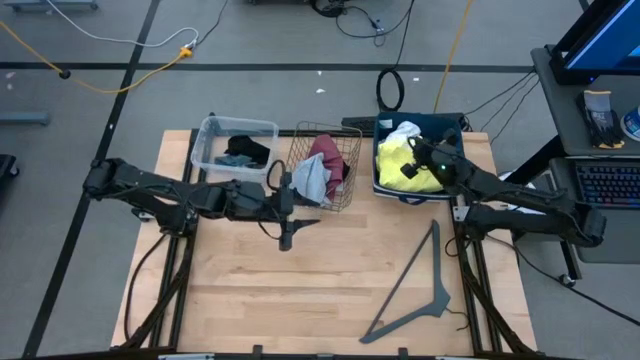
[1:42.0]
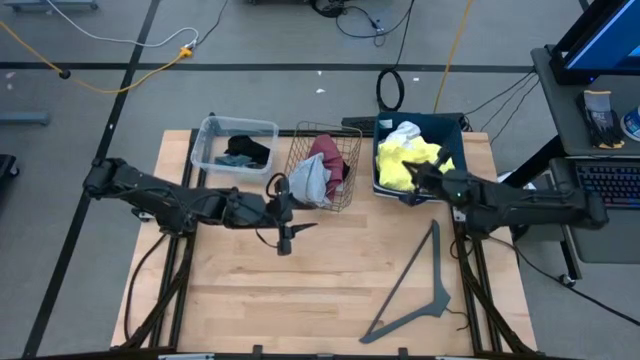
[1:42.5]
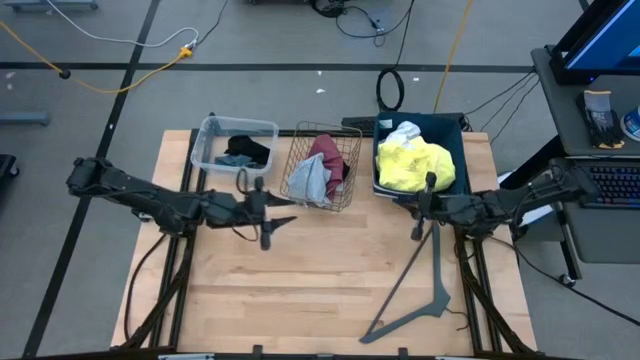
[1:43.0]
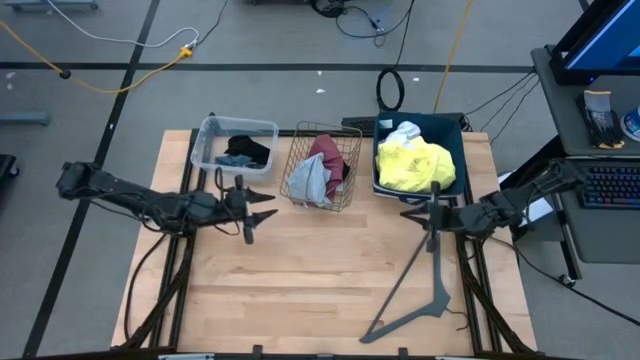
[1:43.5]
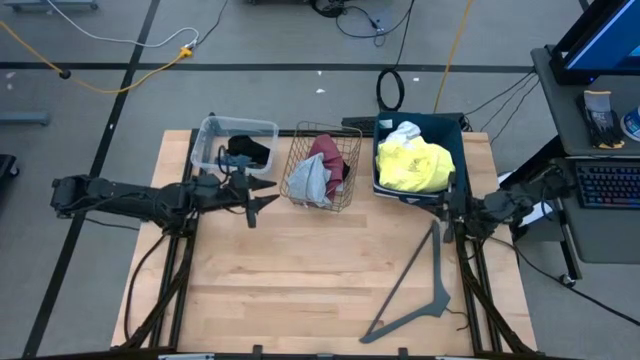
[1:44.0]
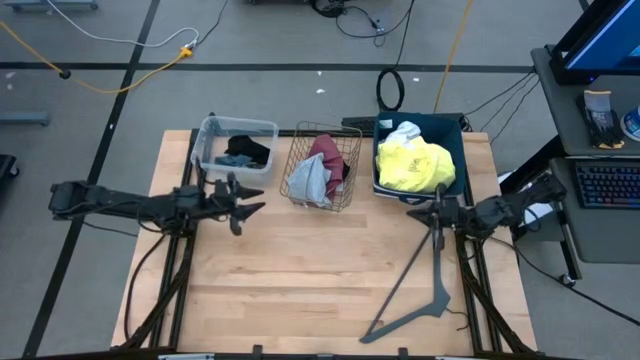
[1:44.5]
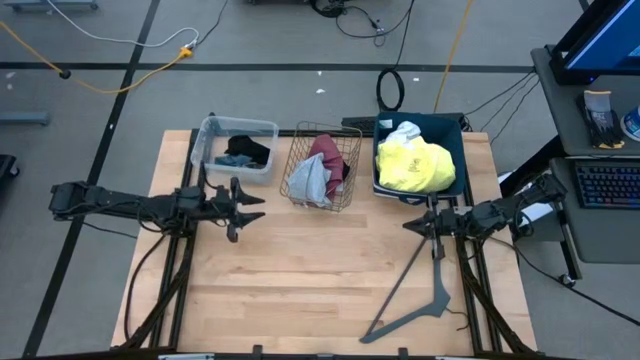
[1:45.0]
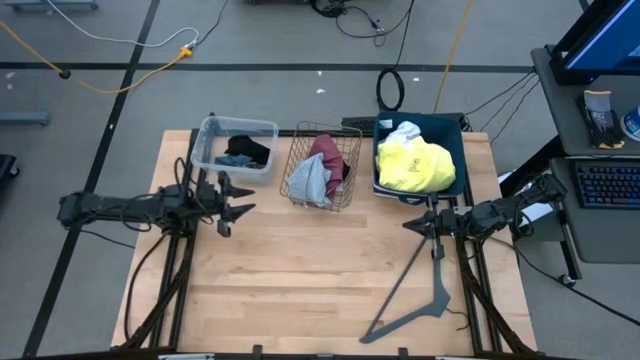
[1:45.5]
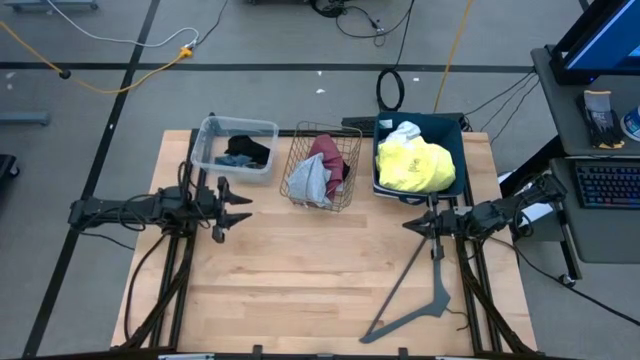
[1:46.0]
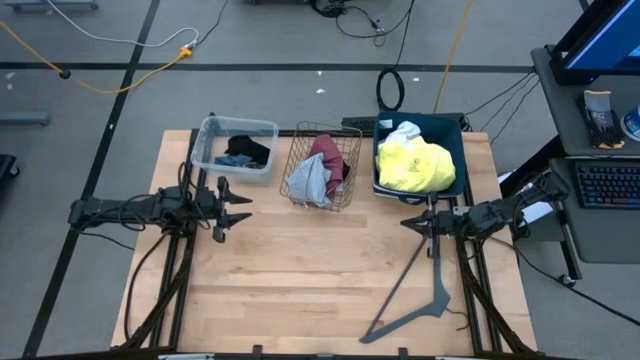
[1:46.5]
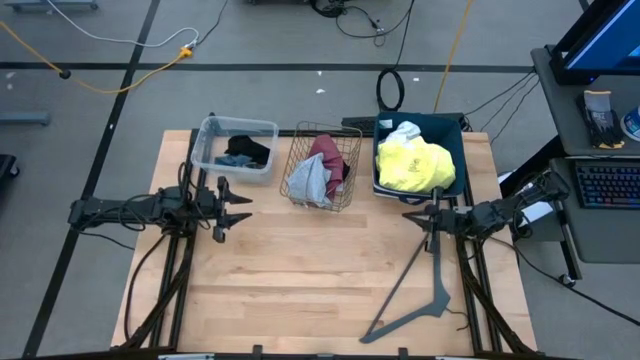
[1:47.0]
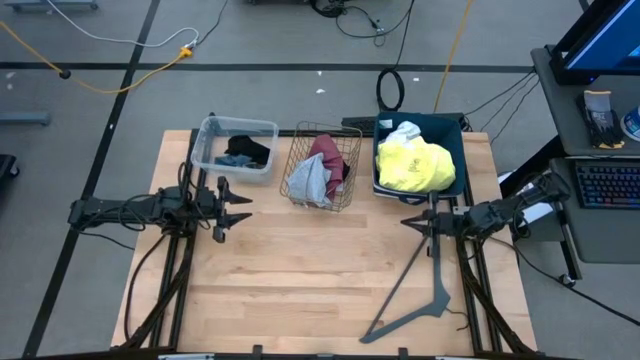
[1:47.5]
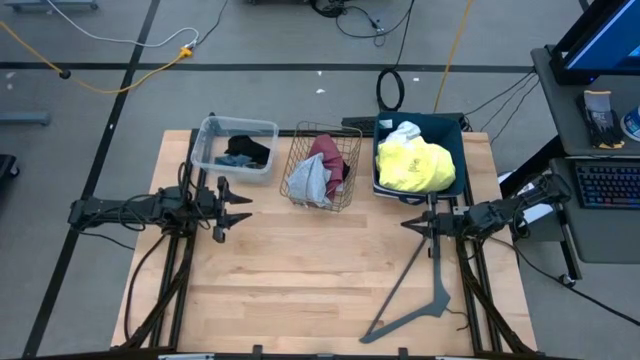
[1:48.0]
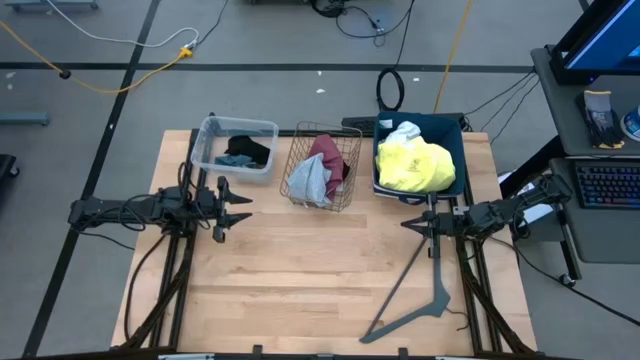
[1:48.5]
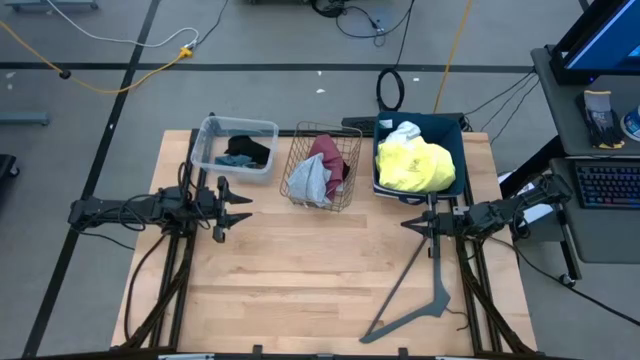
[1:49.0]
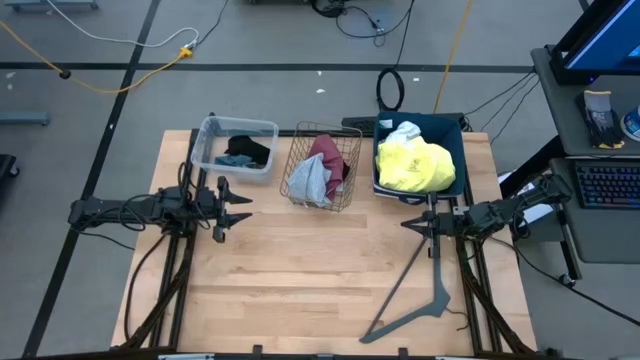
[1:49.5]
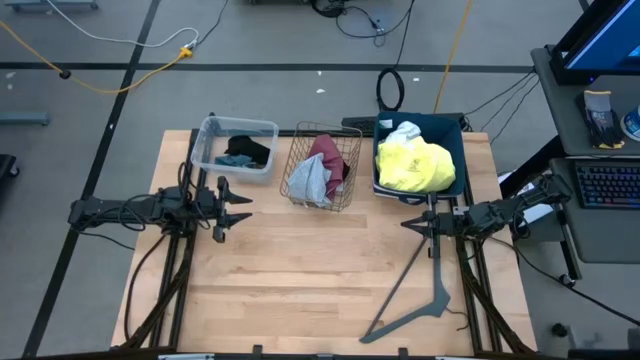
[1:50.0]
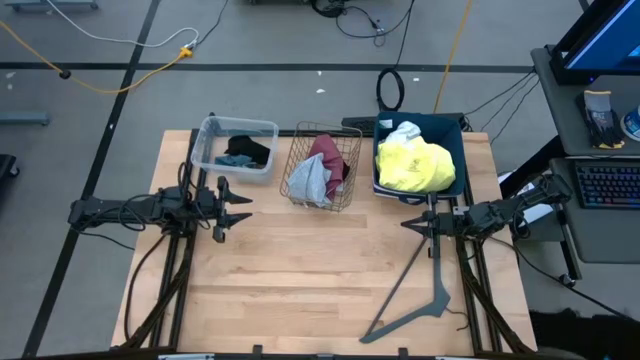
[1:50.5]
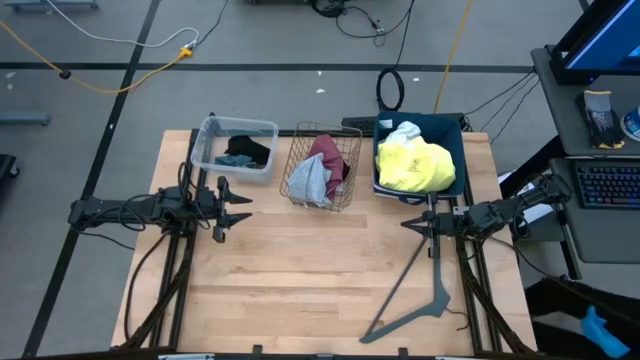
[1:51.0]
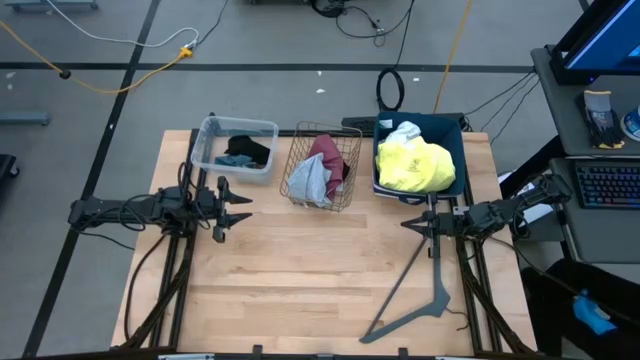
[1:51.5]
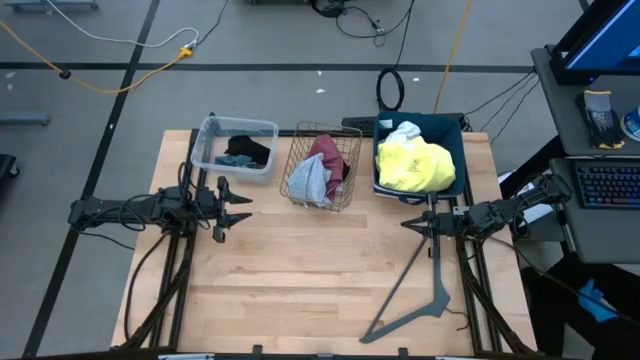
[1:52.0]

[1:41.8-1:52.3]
Task: Pick & Place Cloths
Return to Home Position

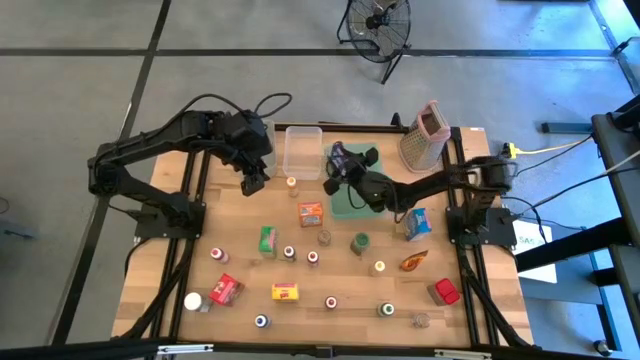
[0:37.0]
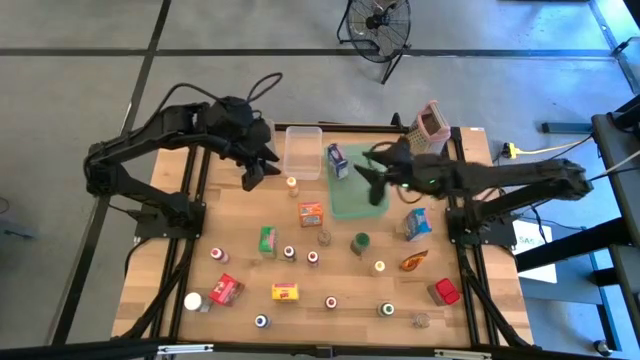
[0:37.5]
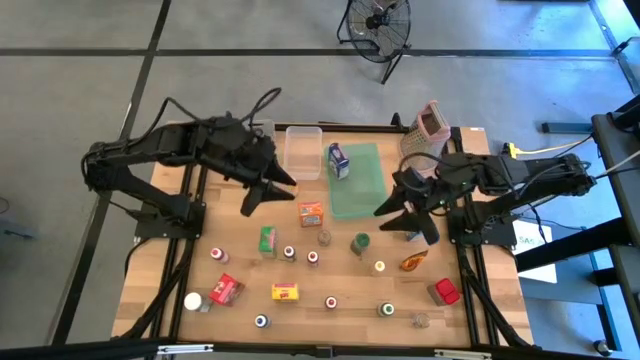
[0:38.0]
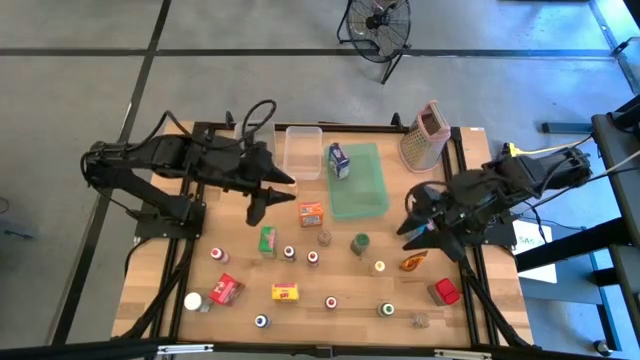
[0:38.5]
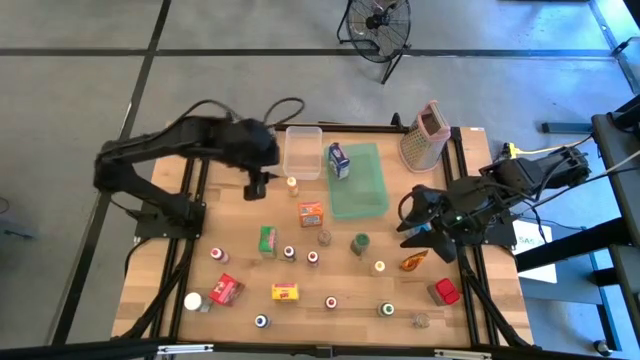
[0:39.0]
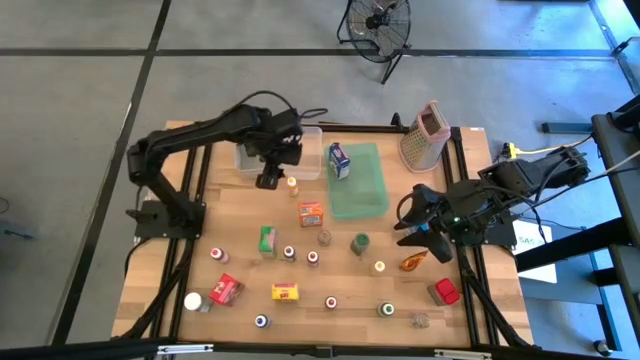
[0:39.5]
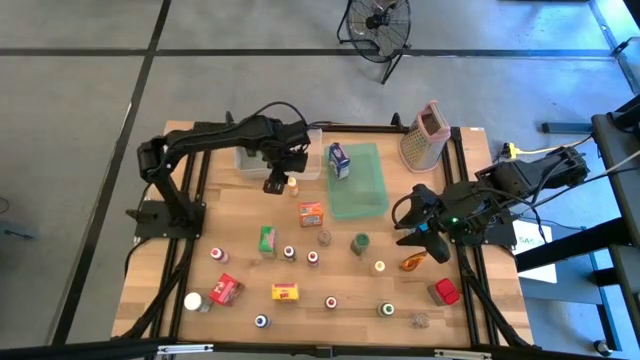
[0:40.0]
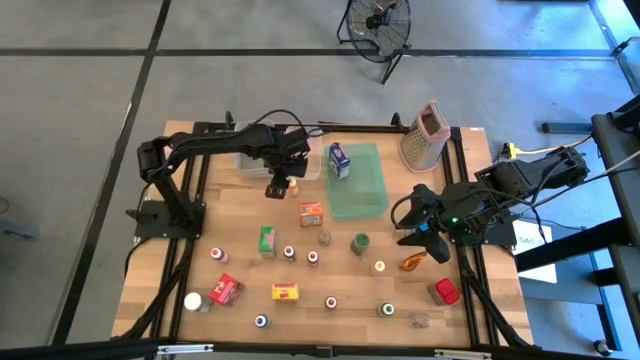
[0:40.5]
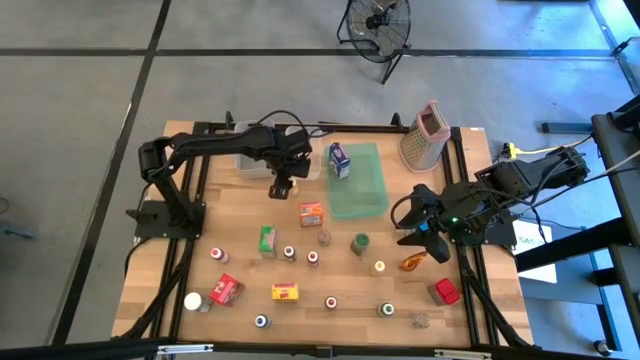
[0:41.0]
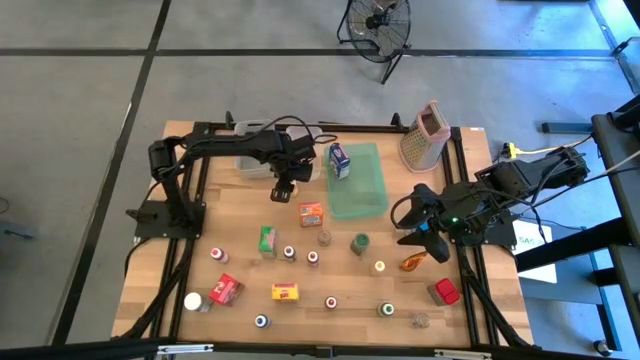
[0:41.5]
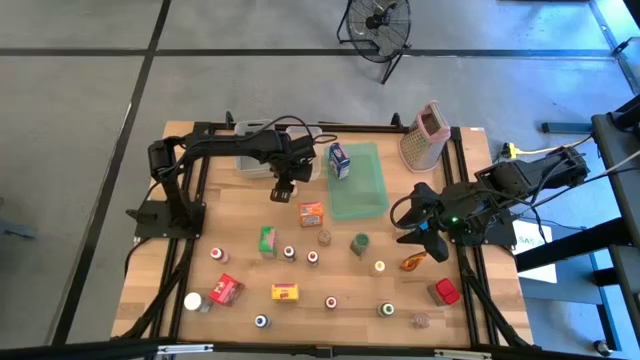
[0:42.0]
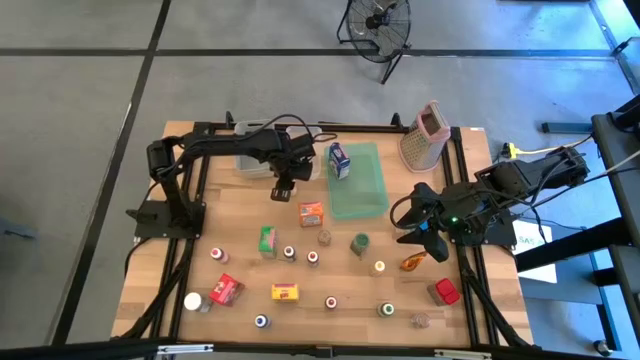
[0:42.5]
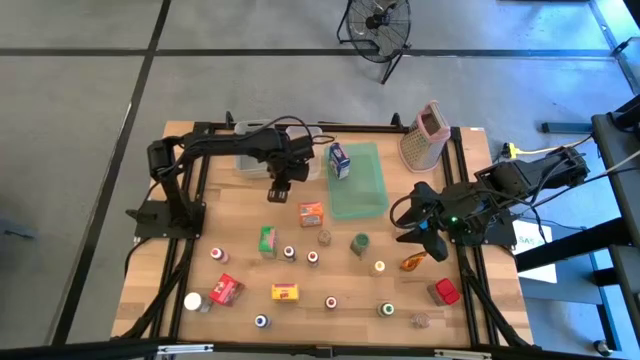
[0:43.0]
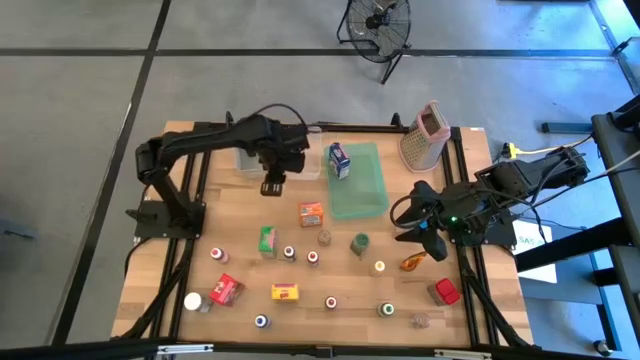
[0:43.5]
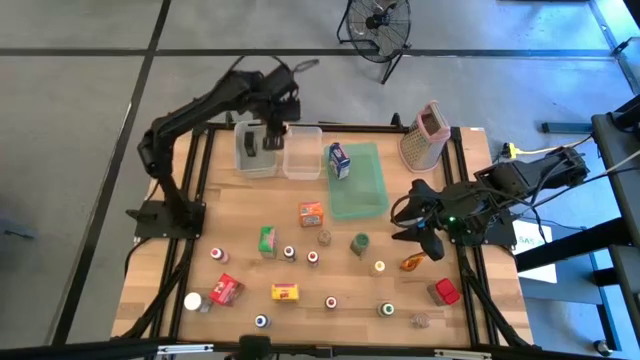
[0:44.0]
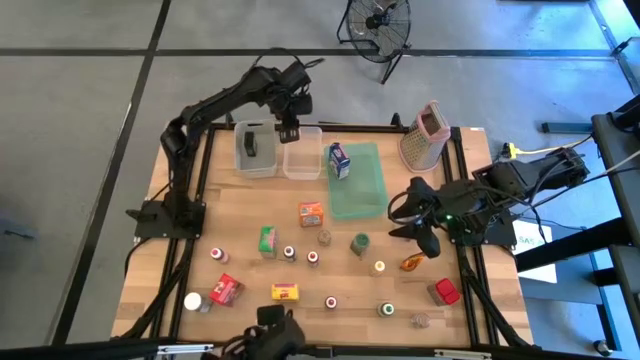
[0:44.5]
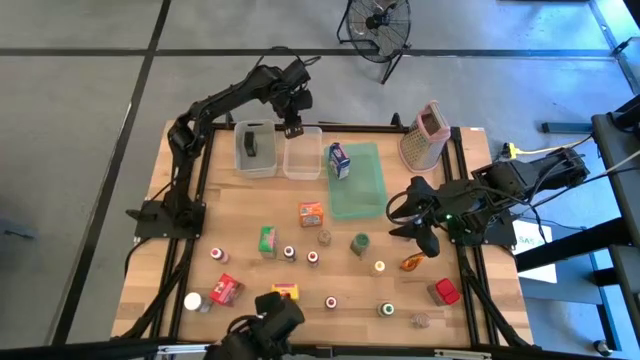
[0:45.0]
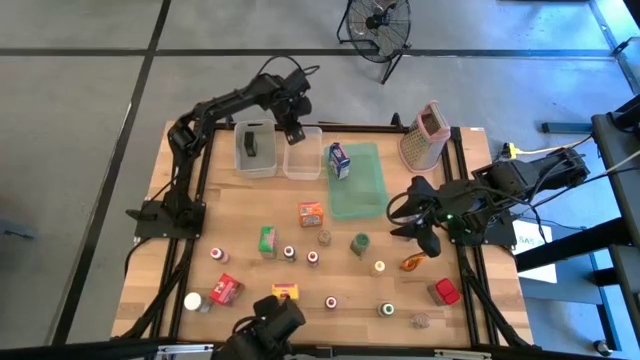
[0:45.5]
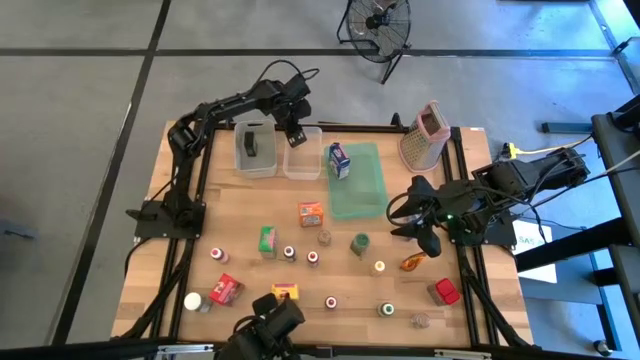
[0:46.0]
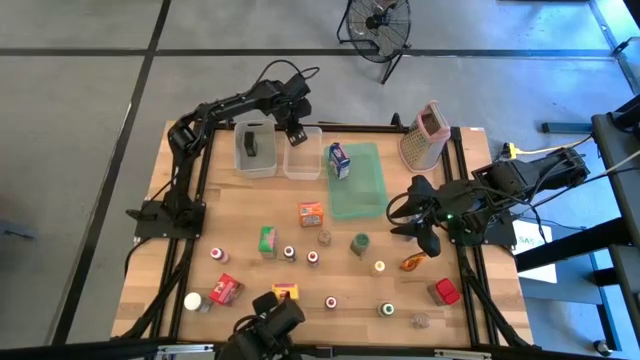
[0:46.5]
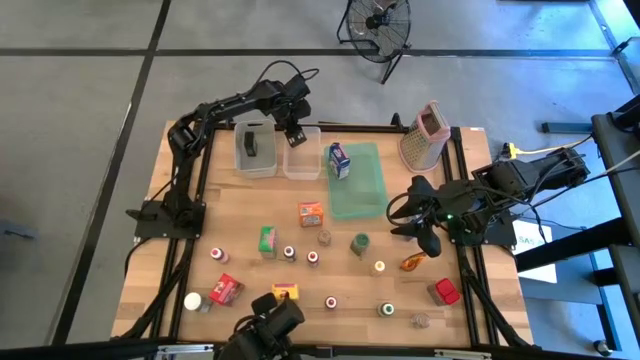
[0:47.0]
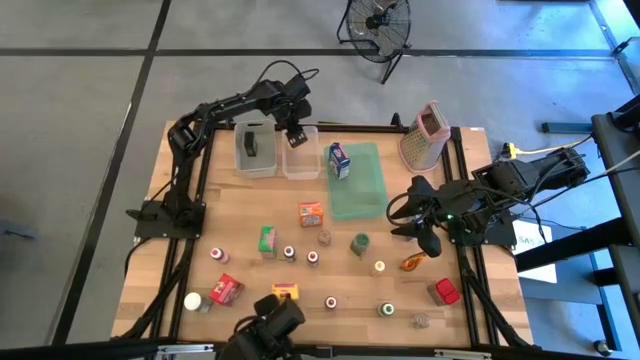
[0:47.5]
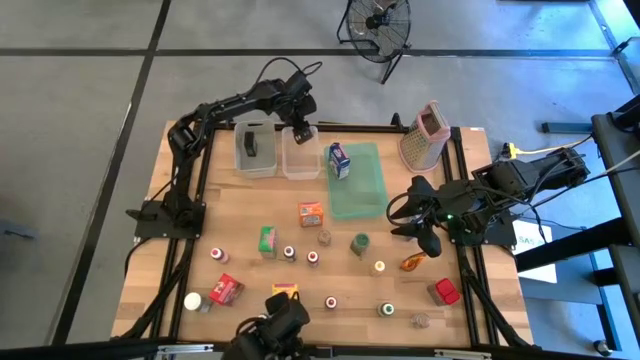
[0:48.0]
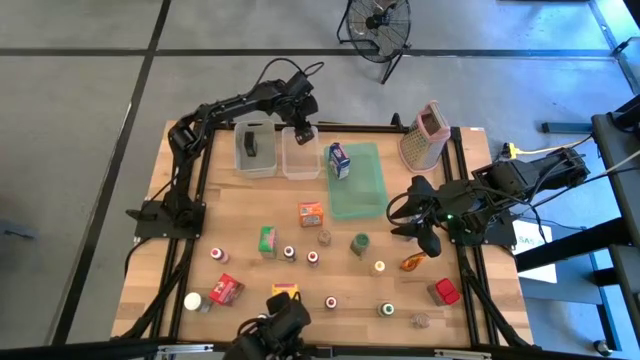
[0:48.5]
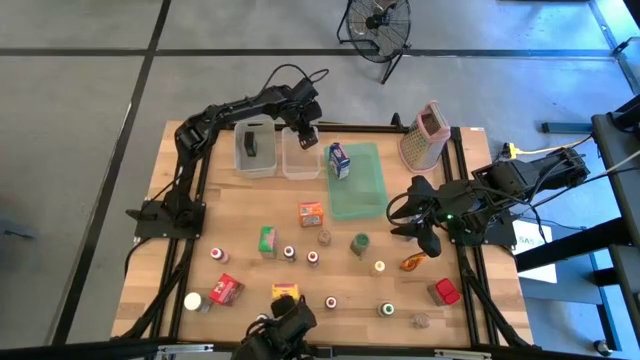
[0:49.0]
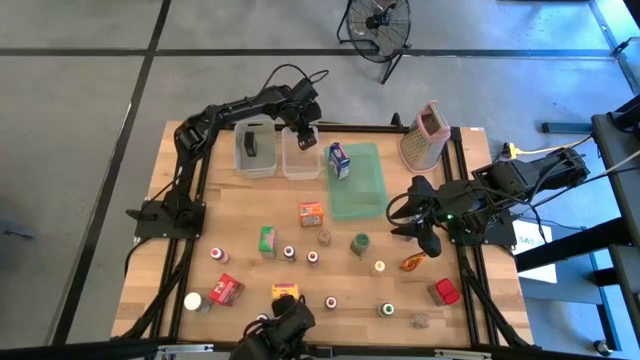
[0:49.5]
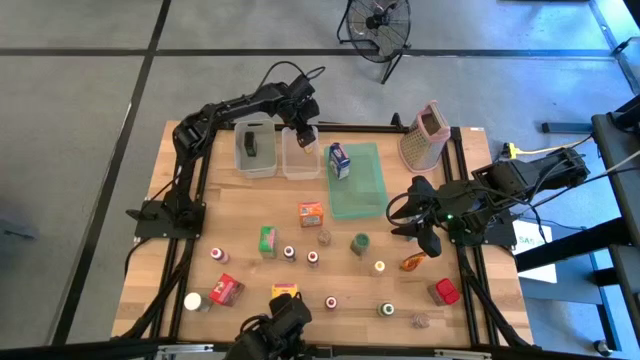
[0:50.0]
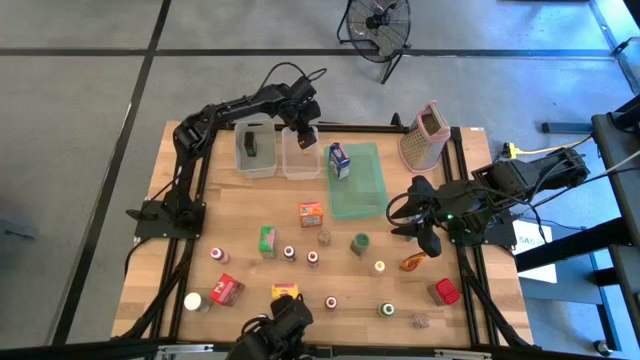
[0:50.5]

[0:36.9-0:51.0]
Task: Pick & Place Kitchen Items
Put the top yellow food coloring bottle into the transparent bin
